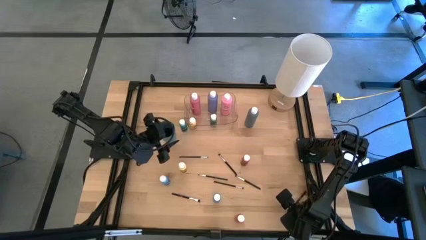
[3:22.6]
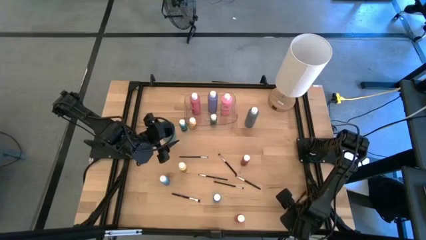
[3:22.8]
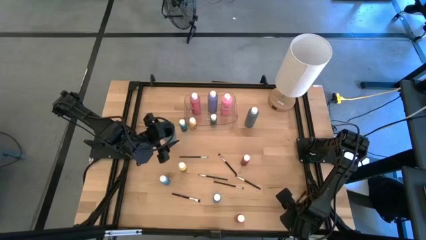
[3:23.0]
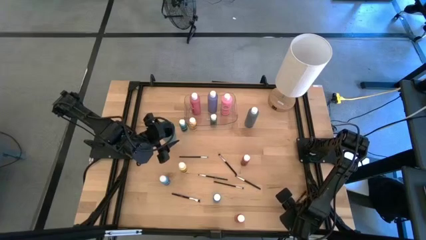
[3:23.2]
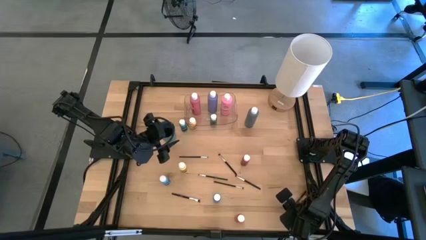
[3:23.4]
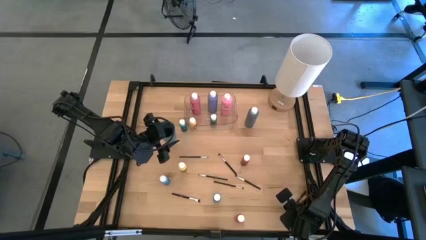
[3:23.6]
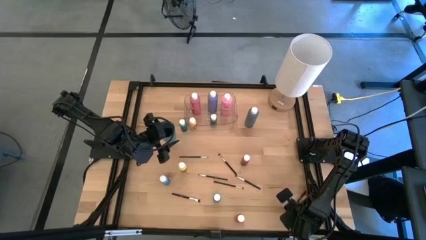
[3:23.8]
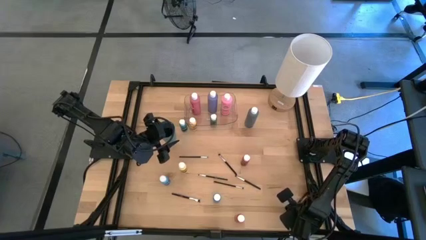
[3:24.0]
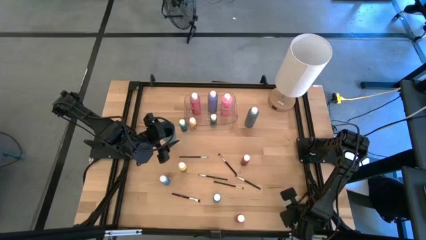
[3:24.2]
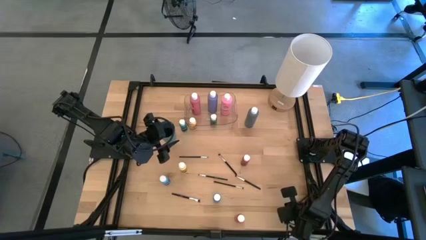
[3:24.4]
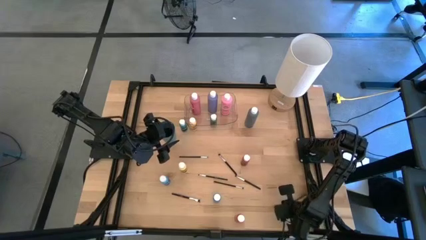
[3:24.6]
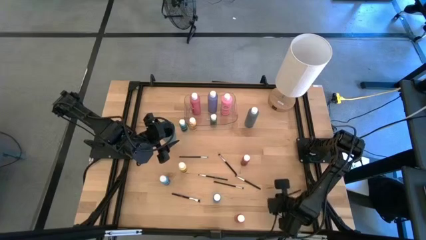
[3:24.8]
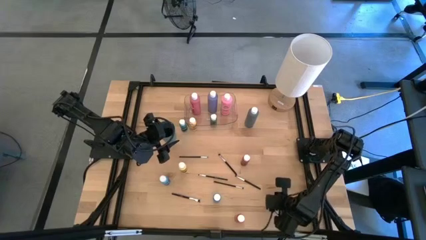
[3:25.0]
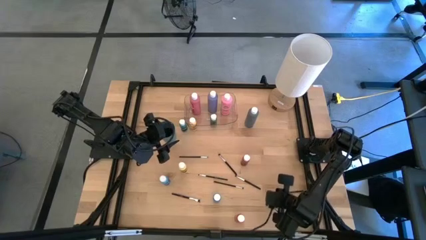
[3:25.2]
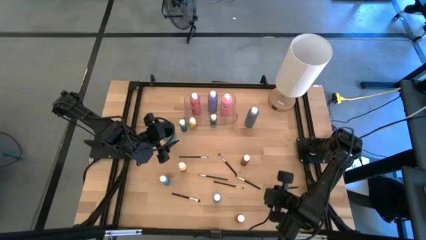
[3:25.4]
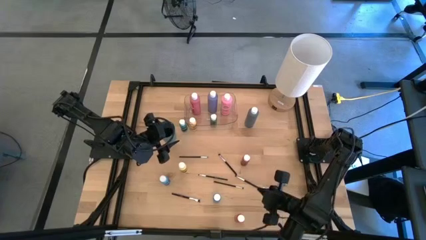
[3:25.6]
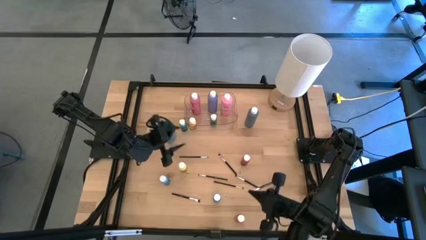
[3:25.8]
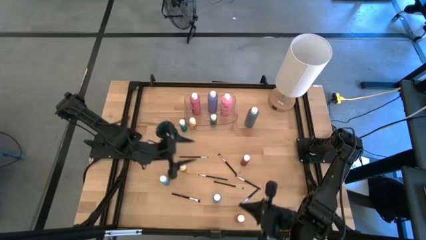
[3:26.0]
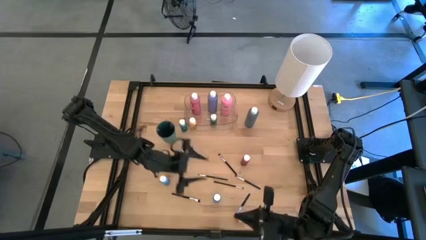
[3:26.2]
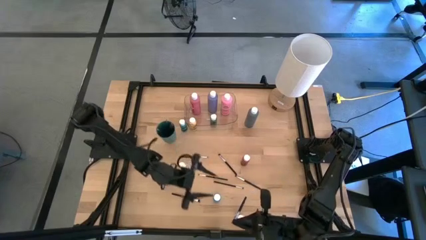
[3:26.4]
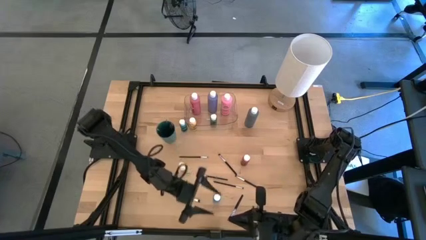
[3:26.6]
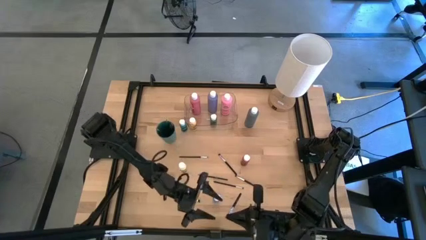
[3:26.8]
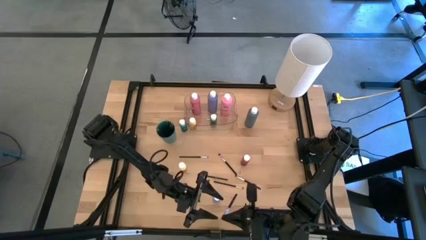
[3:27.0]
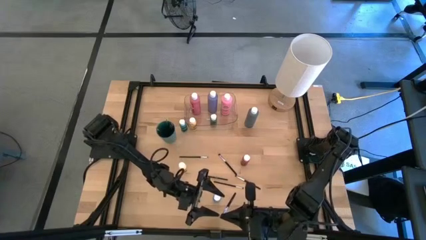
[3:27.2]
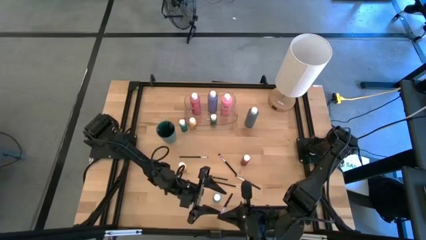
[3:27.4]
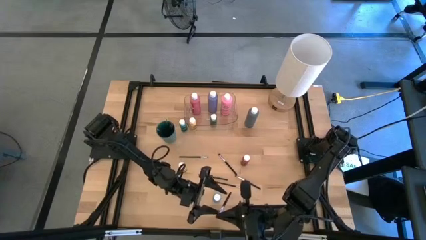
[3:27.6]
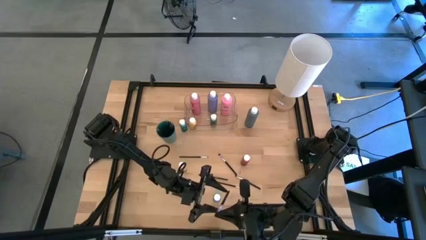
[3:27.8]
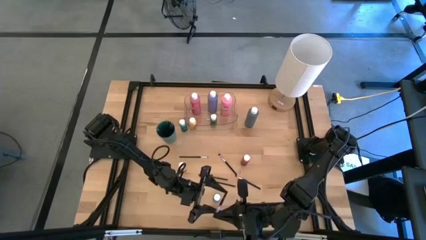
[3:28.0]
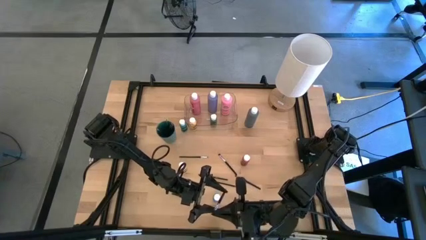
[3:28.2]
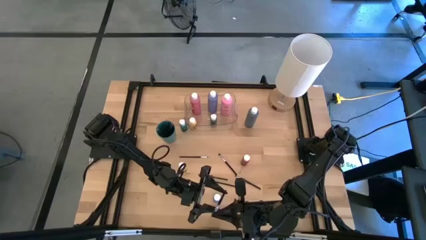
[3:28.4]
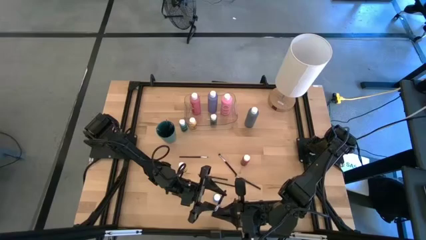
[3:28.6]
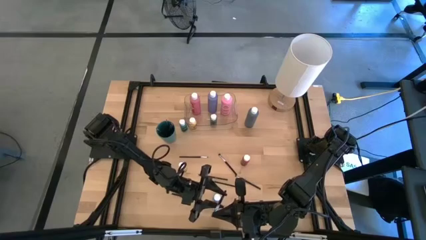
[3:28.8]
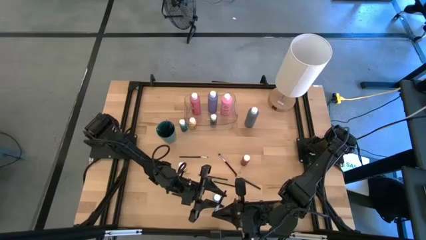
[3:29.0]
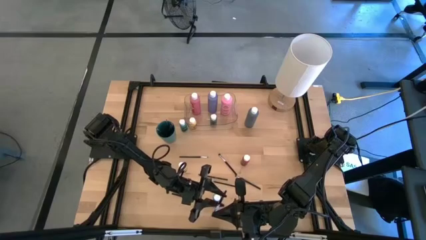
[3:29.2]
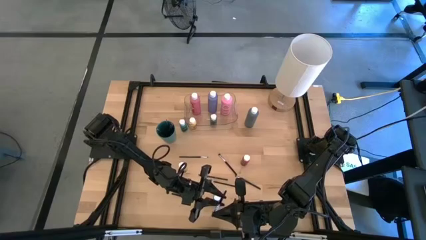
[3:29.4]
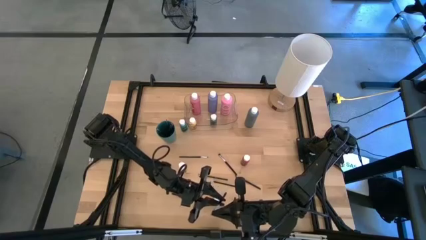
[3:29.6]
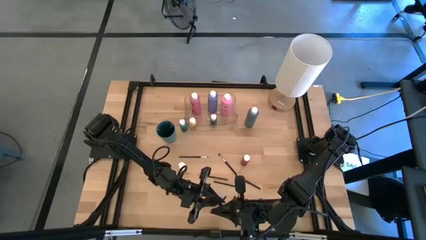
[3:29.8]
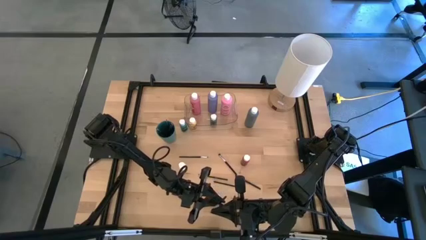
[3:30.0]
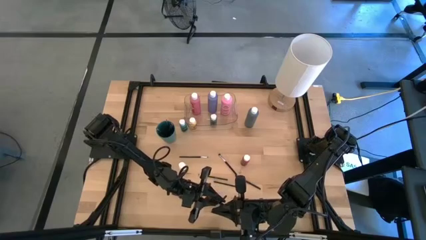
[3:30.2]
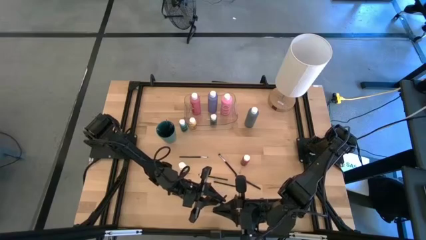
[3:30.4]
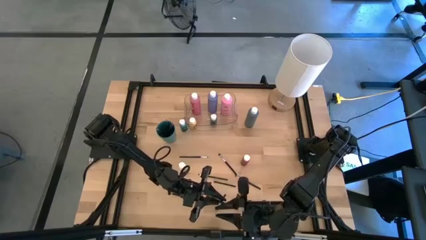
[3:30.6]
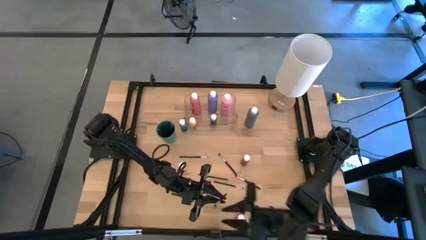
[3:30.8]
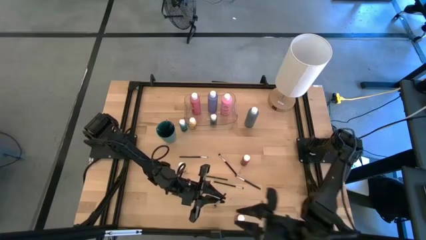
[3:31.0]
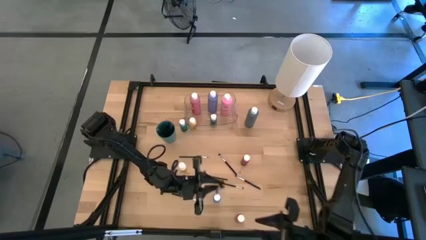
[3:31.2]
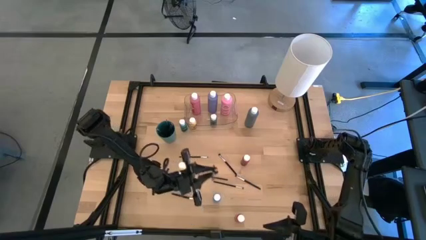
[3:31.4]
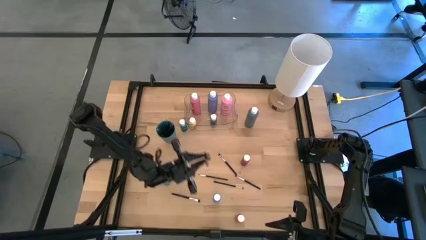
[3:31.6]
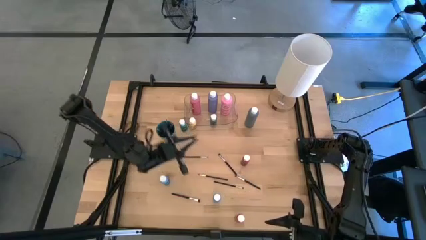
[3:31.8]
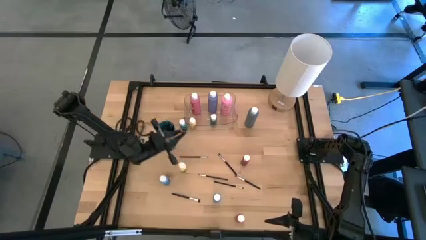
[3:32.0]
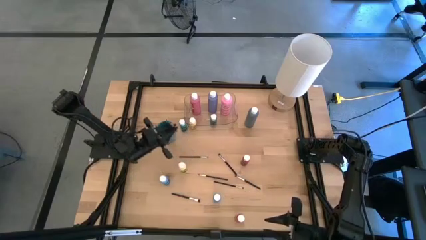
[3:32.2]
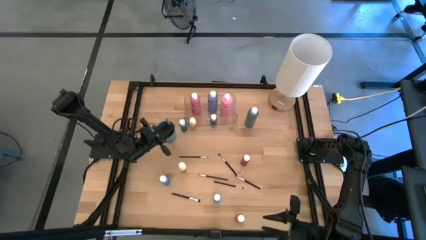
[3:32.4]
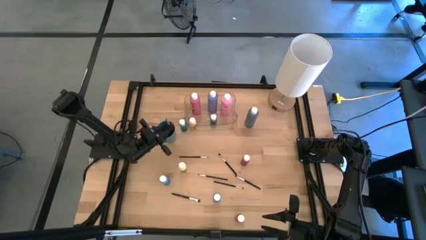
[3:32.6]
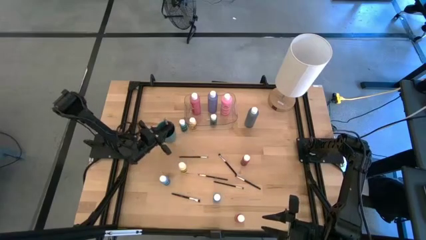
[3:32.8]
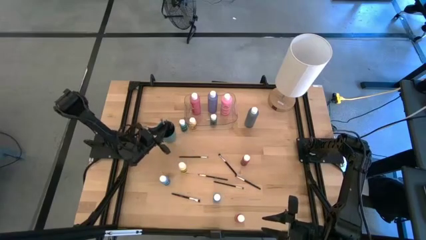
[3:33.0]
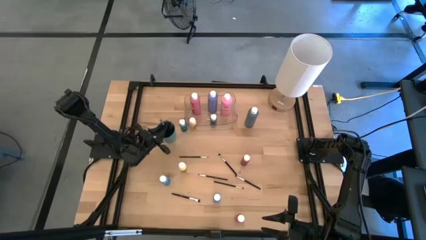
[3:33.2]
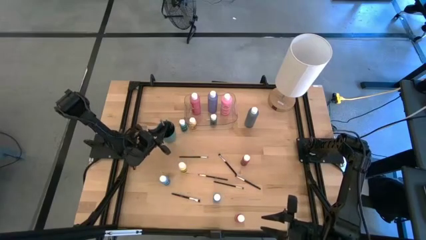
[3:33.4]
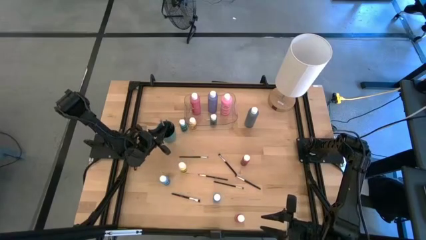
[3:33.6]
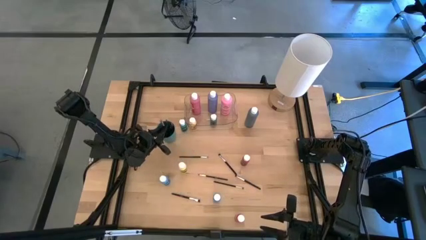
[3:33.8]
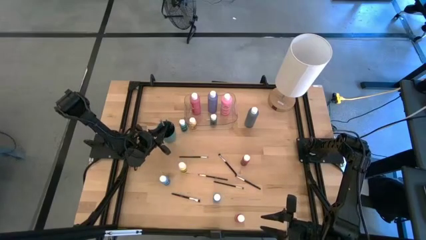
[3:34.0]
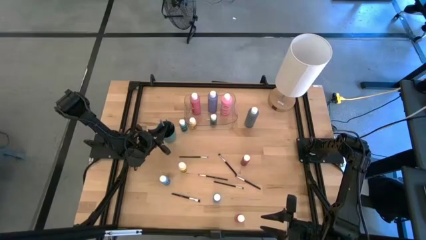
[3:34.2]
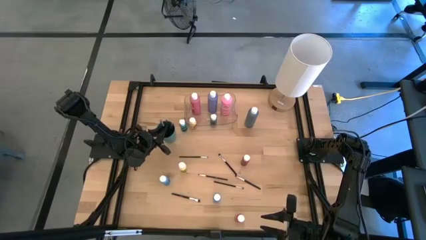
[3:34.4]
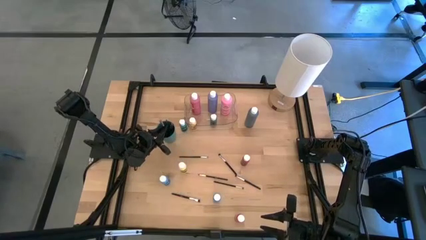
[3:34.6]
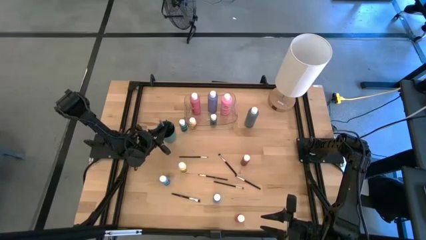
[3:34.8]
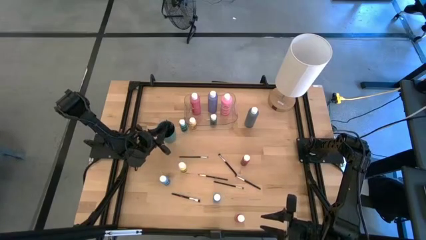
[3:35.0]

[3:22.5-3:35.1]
Task: Pick & Place Paint Supplies
Put the black paint brush into the green cup

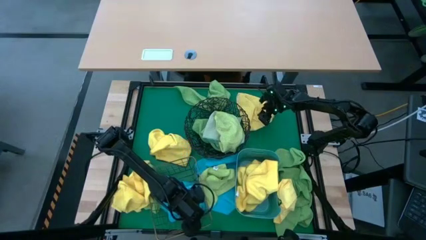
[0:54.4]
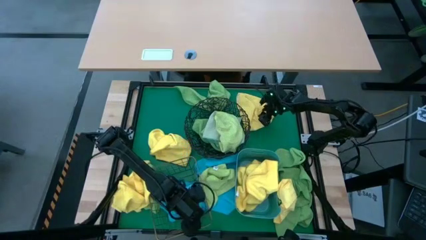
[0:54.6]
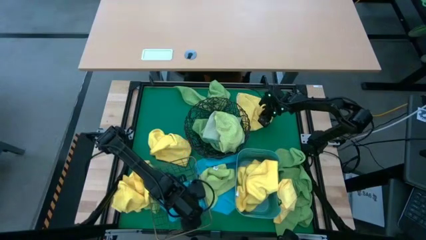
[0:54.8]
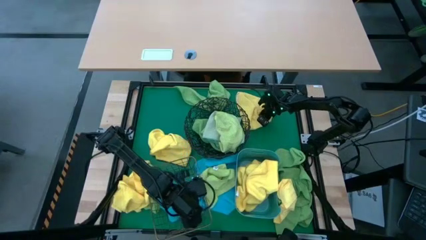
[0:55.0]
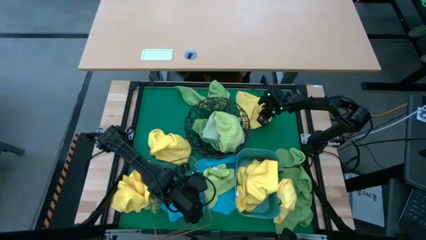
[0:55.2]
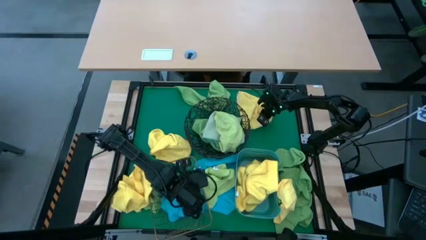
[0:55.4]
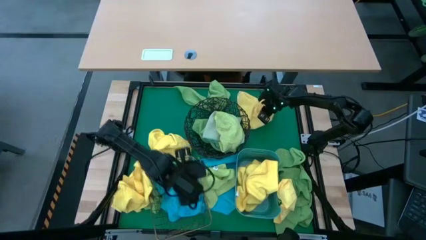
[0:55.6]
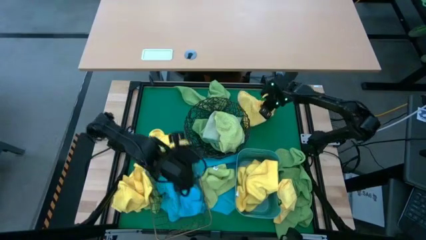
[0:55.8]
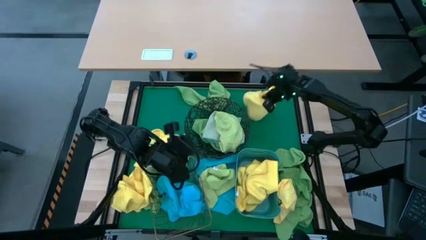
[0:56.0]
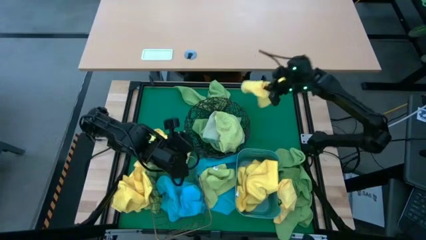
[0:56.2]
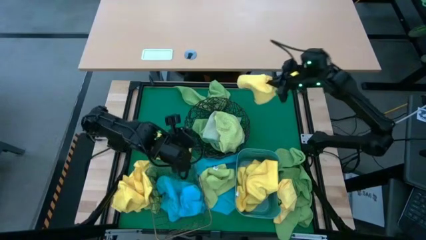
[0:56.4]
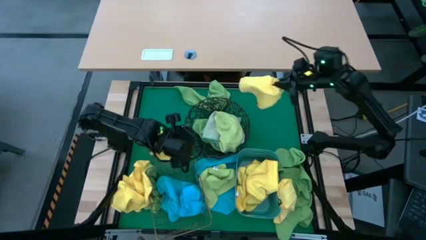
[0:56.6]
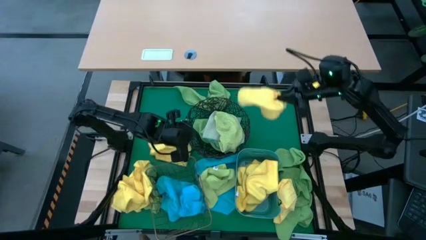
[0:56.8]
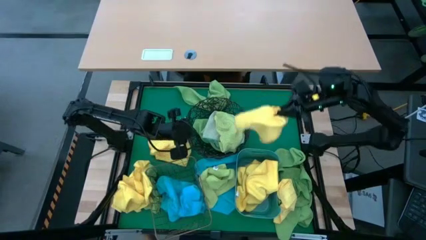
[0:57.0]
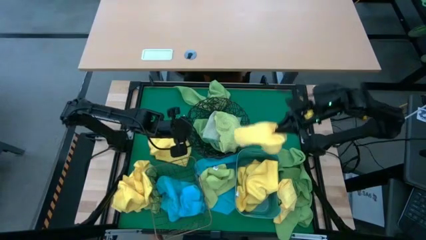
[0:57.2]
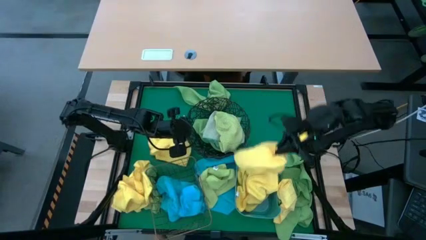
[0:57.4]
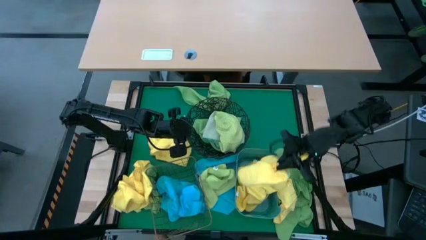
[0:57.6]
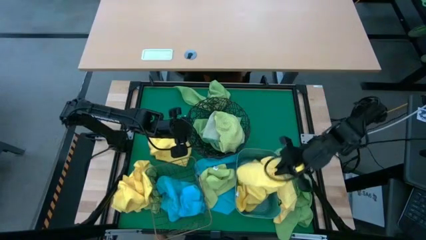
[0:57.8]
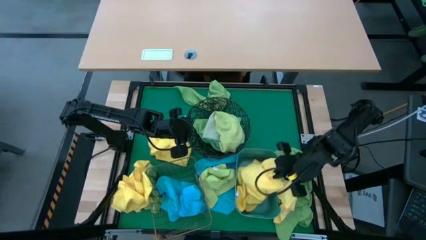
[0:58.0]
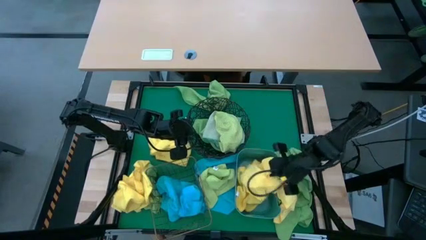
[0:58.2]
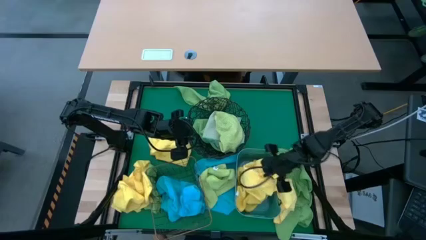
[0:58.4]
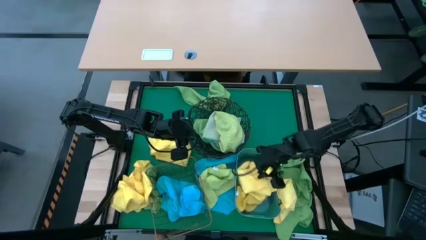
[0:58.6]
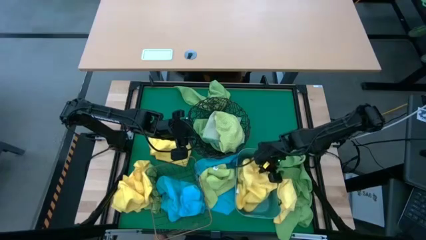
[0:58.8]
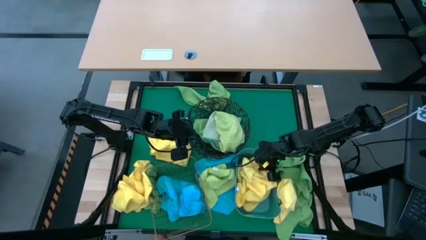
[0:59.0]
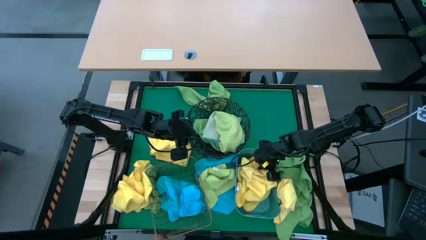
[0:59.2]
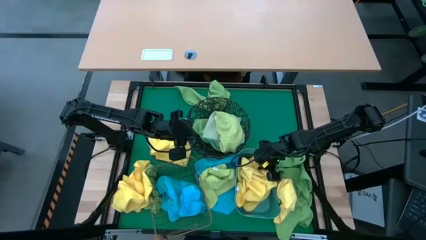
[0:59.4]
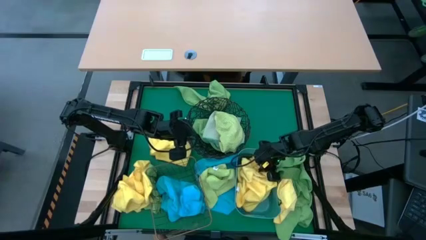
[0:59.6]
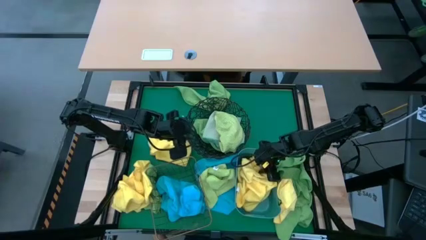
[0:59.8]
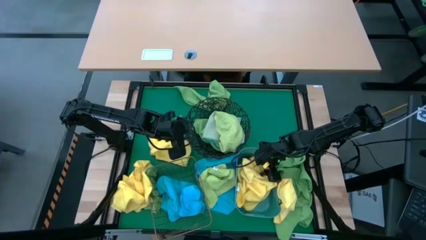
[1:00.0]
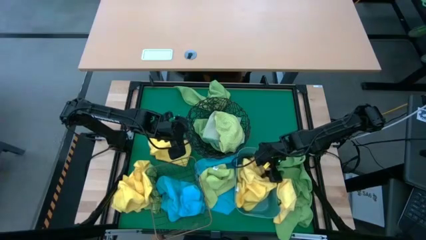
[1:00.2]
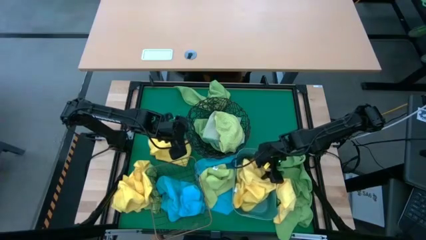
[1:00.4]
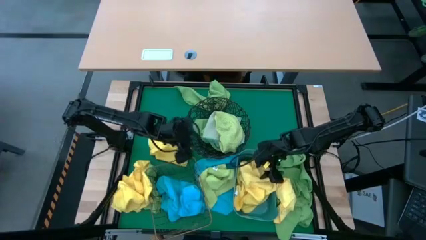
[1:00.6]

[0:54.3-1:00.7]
Task: Sort microfiber towel by color & place in baskets
Put the yellow microfiber cloth into the blue bin
